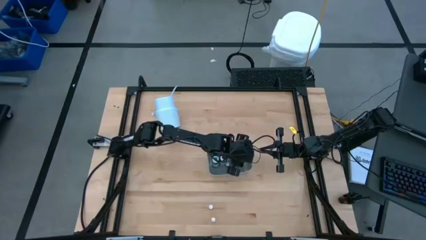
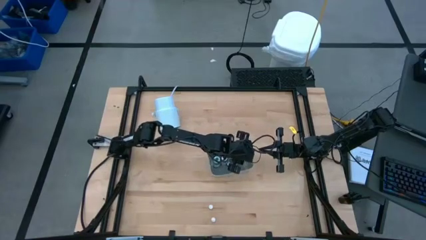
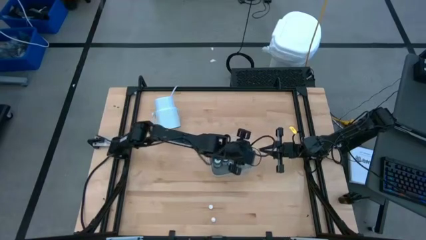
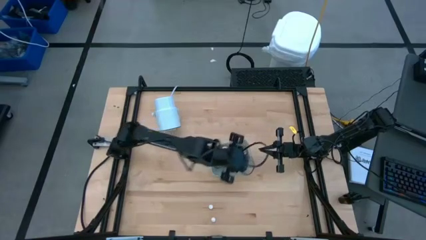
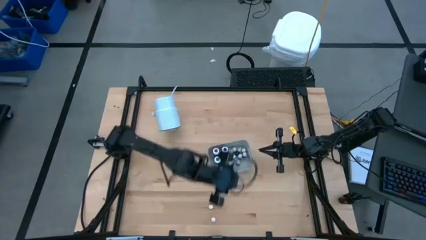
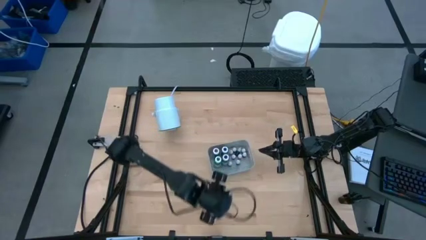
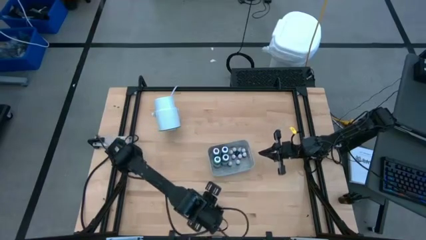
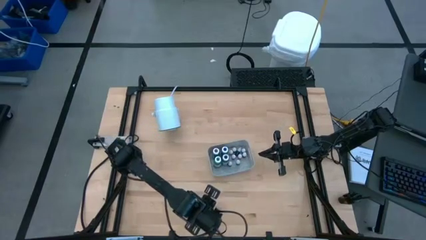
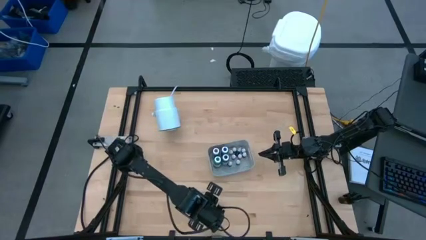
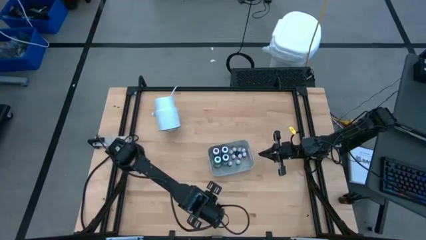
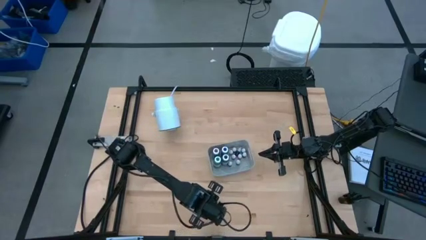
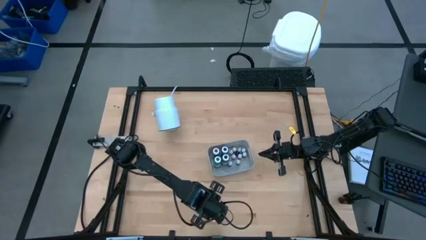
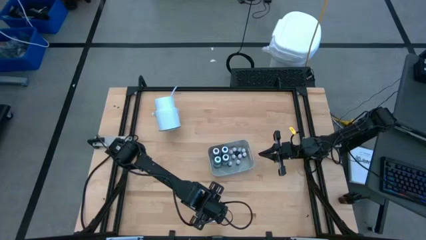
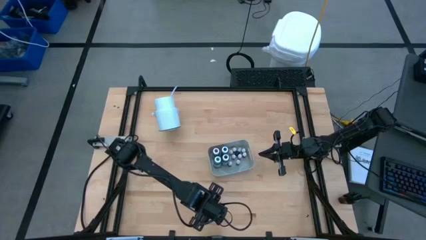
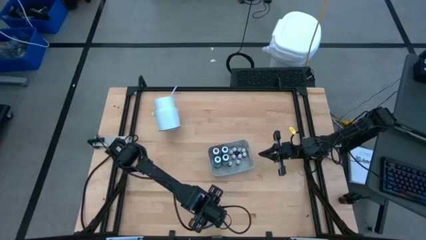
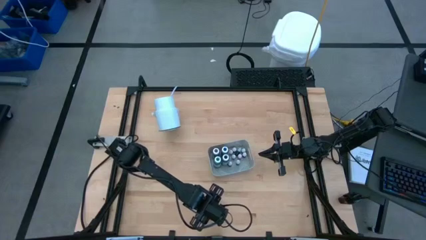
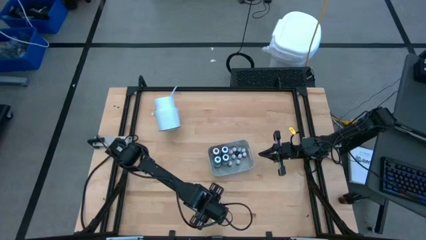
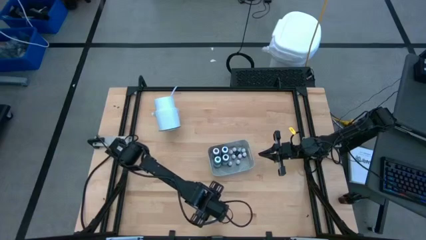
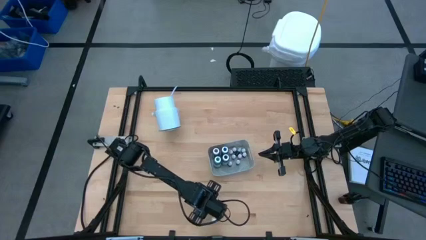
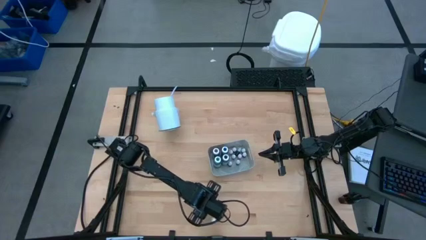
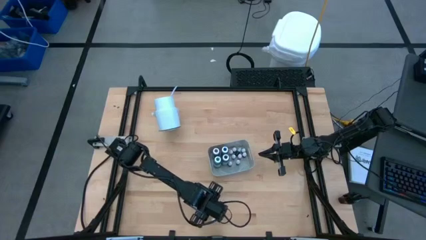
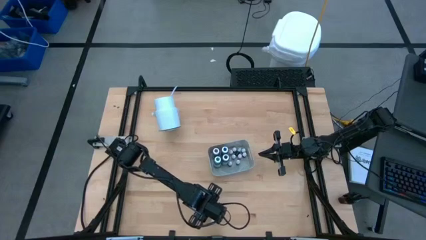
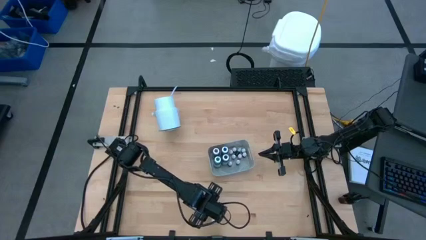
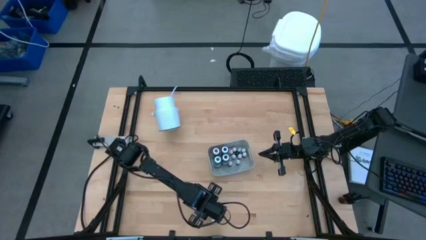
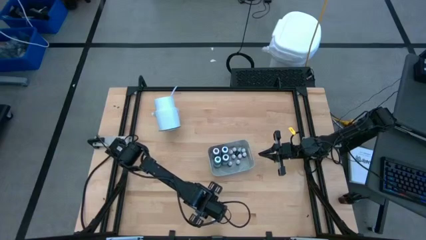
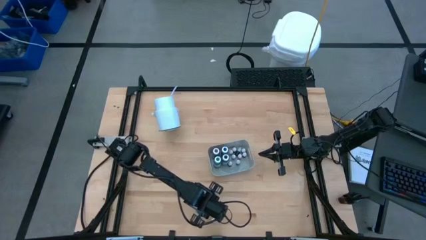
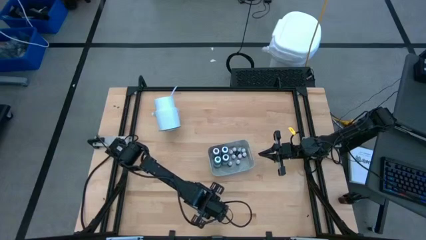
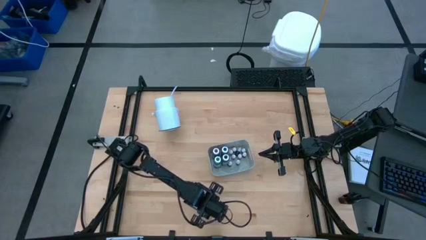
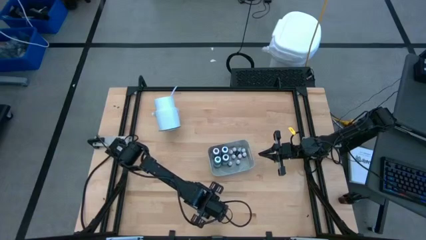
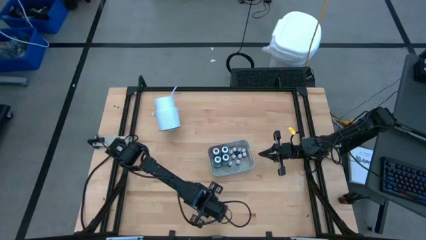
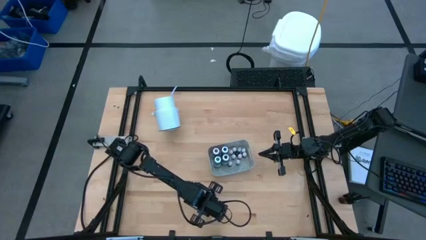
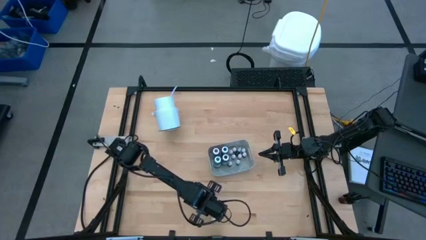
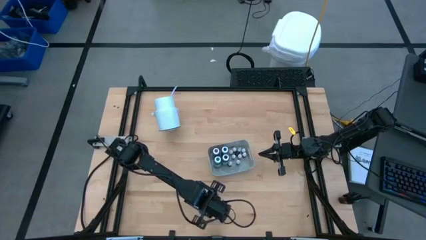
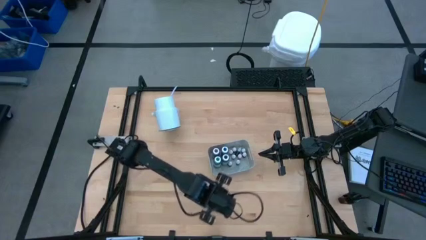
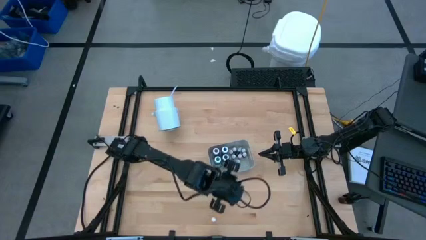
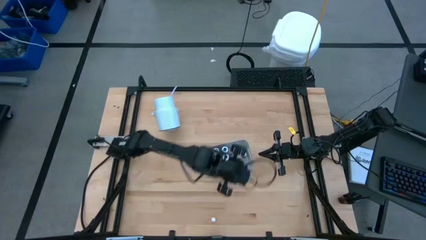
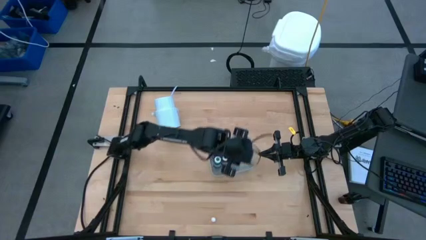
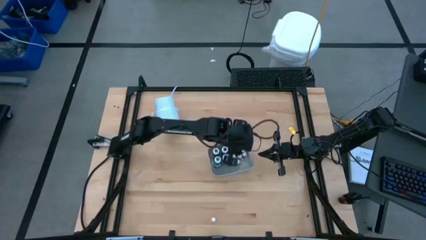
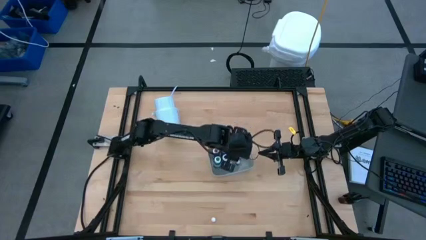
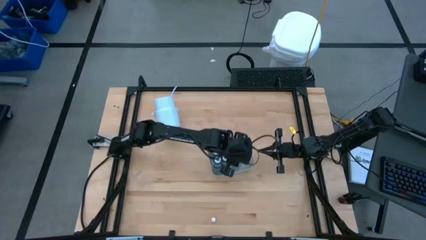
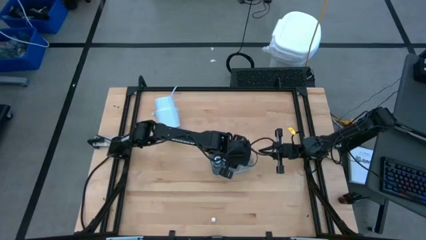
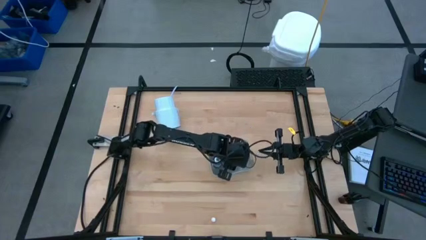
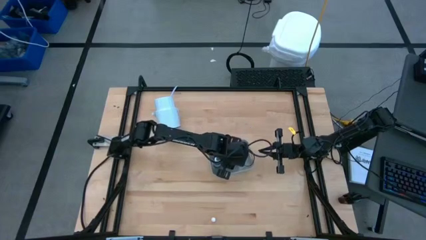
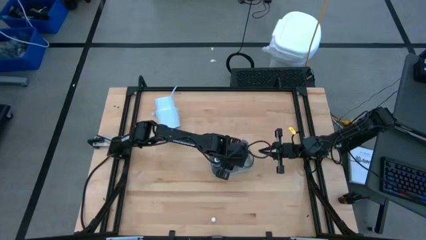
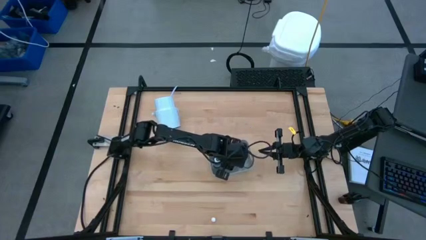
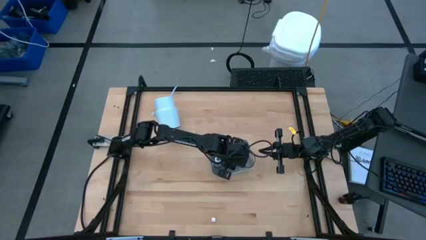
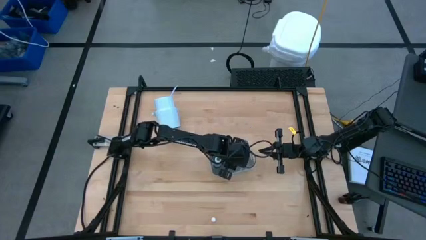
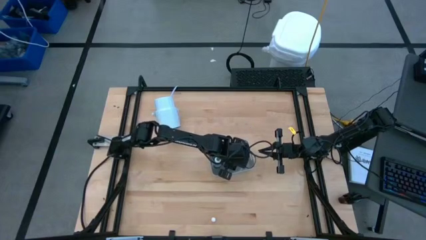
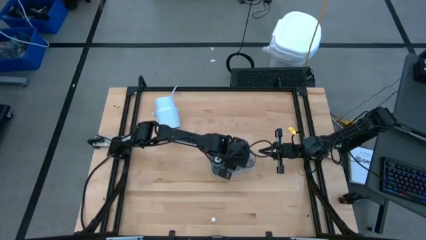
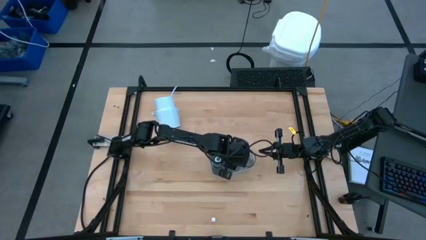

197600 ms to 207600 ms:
Task: Pick & Place food coloring
Put the top small orange food coloring bottle into the bin

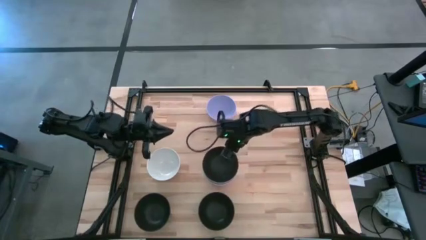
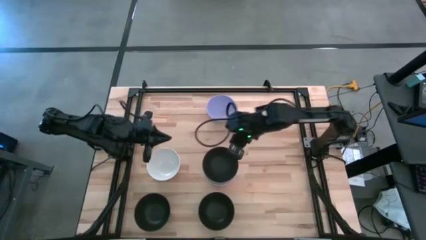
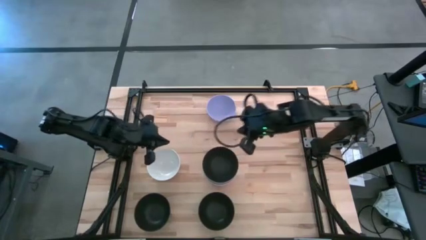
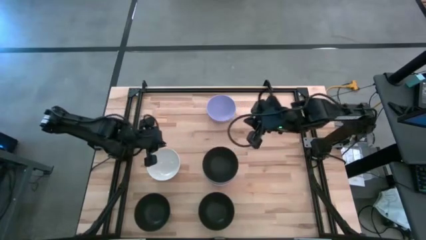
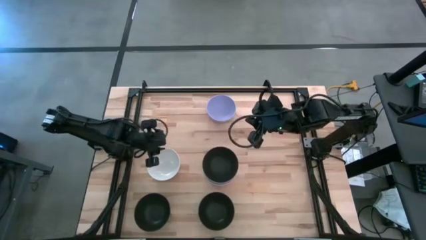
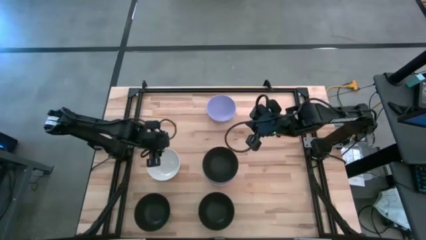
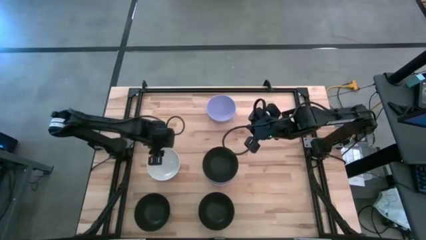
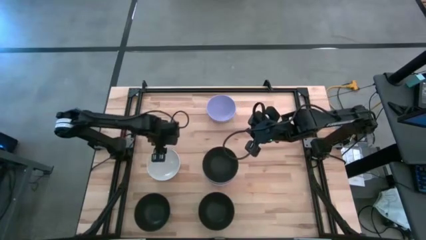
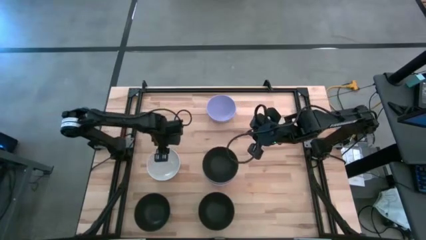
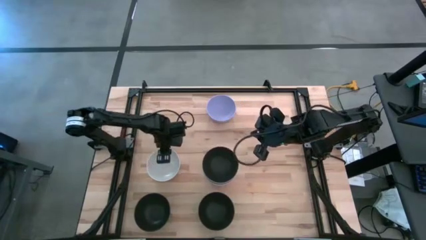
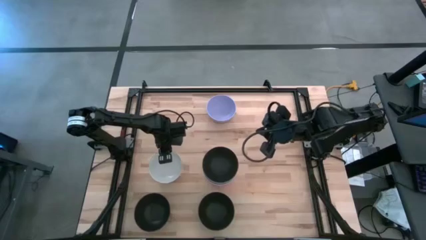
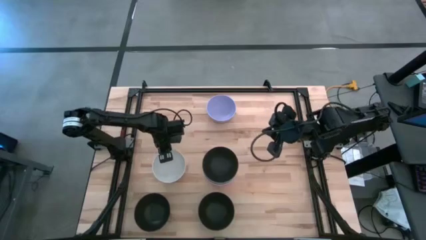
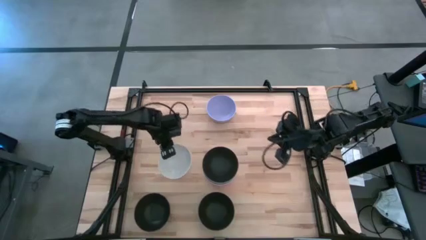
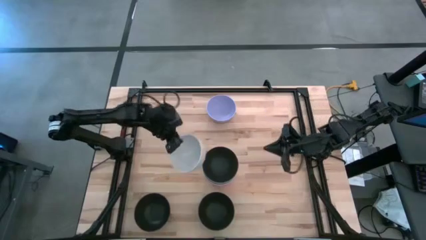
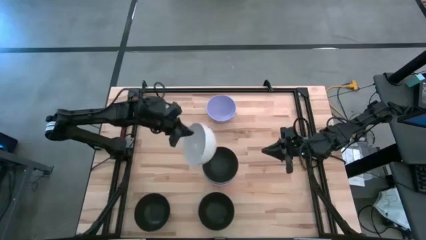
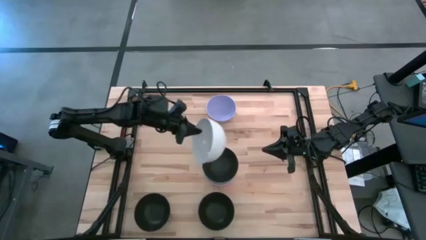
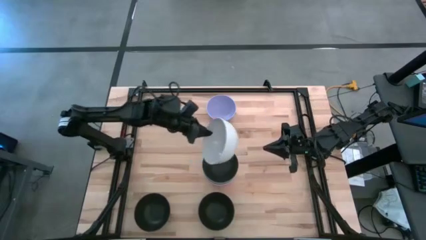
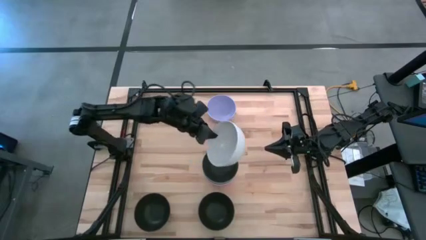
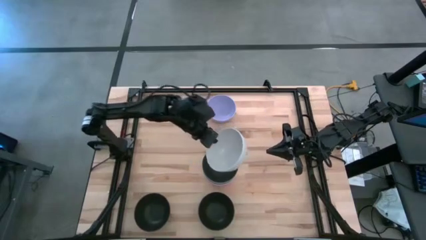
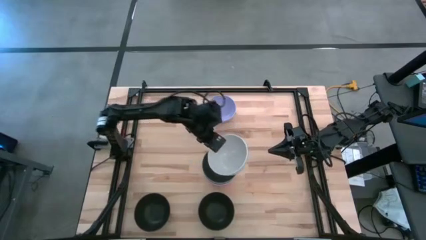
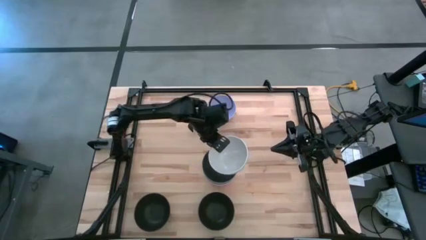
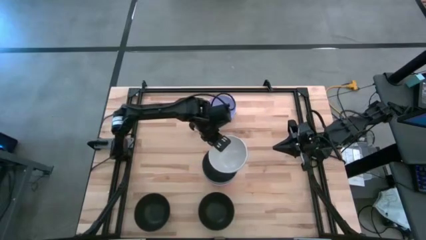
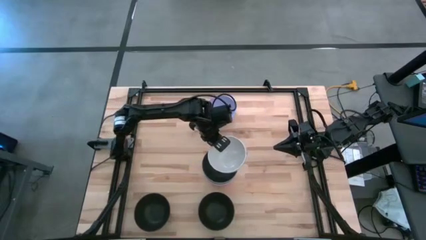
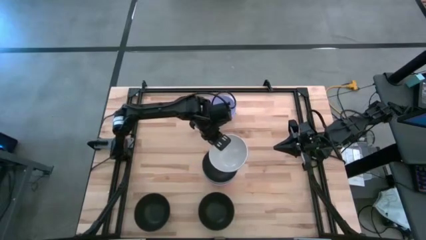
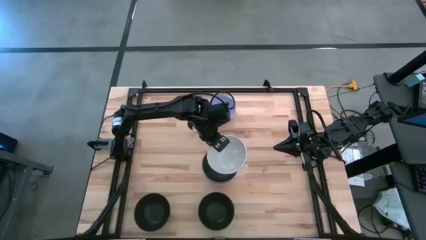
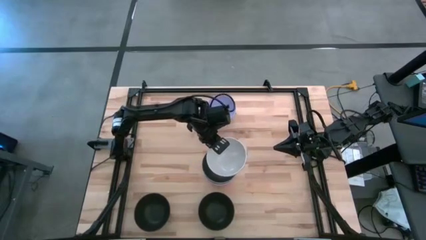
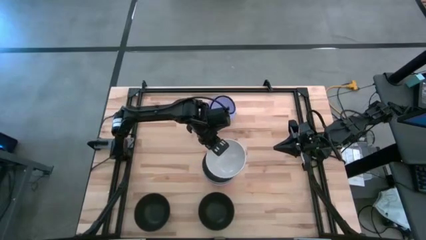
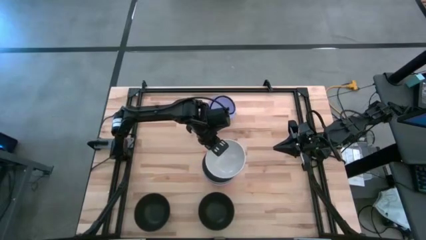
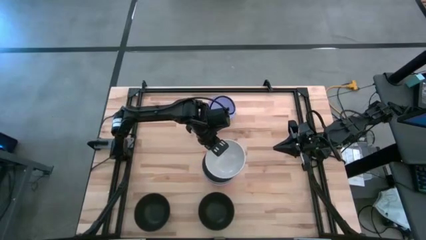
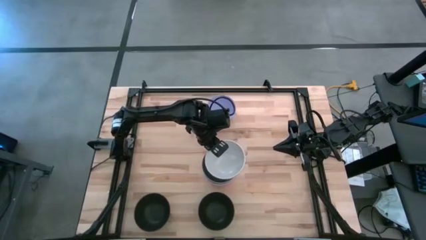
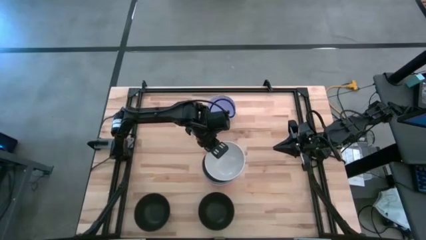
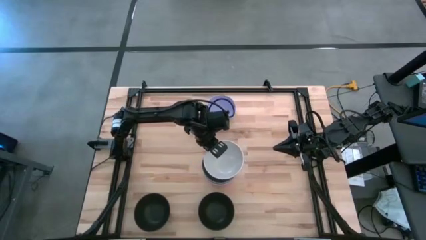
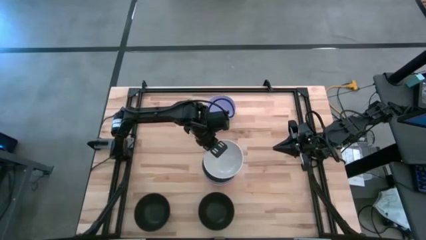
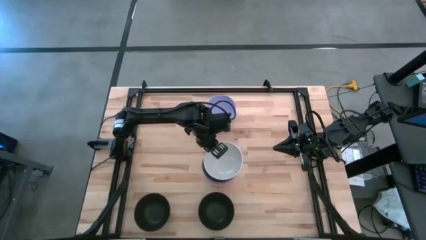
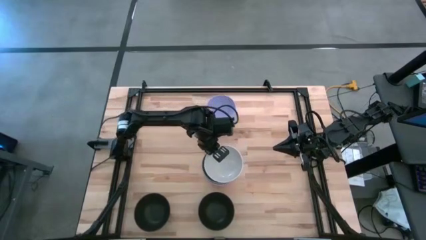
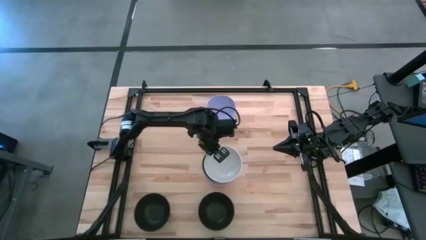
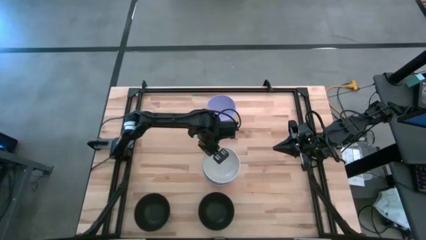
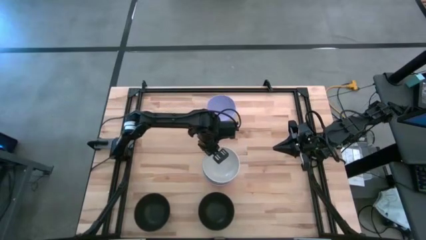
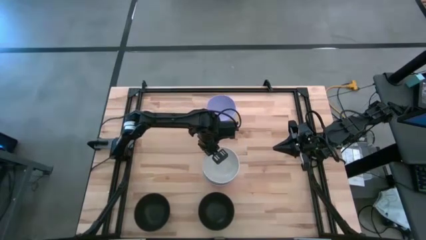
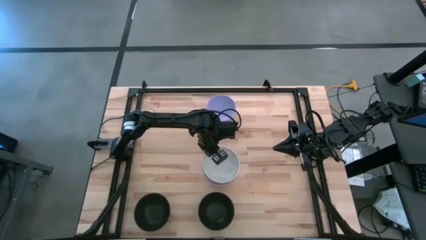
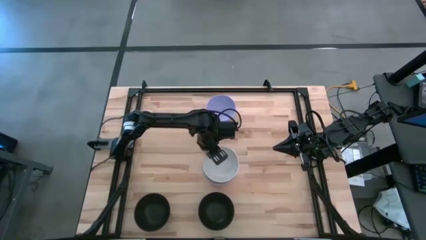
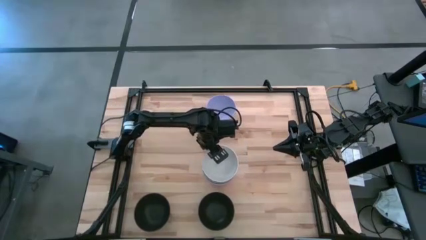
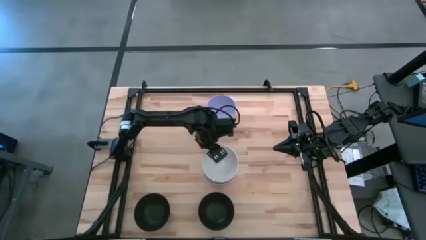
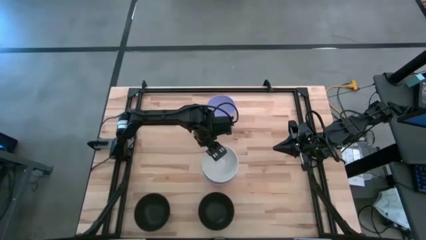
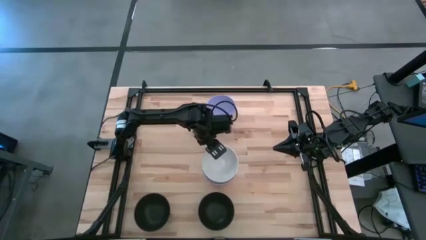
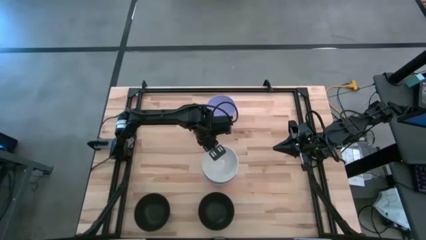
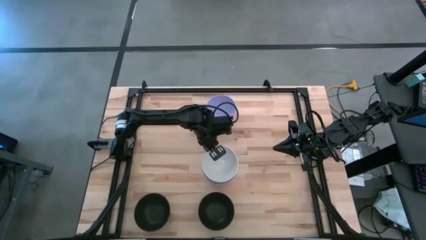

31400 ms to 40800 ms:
Task: Nest bowls inside each other
Stack the white bowl on top of the top black bowl
